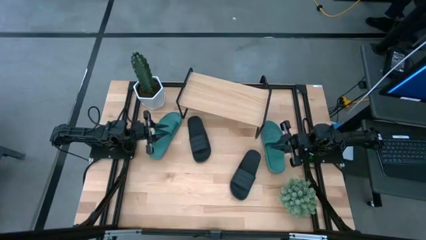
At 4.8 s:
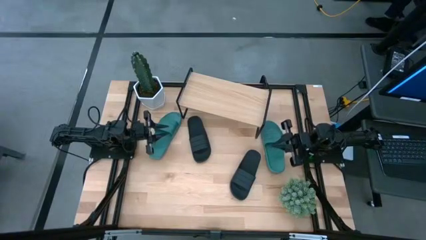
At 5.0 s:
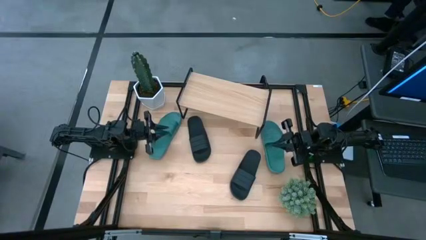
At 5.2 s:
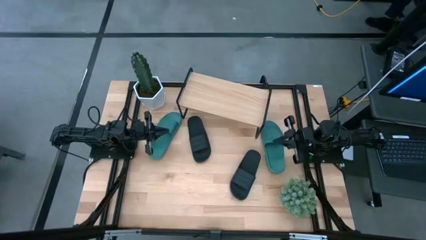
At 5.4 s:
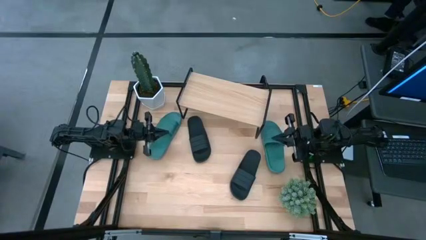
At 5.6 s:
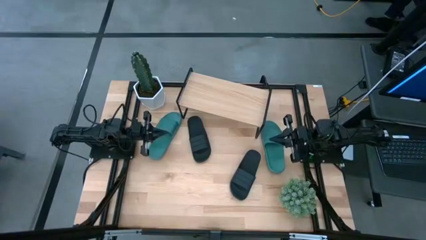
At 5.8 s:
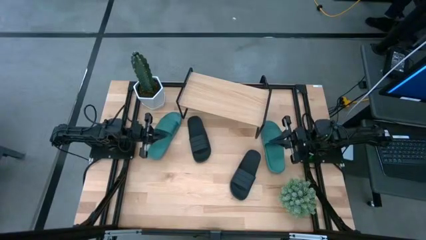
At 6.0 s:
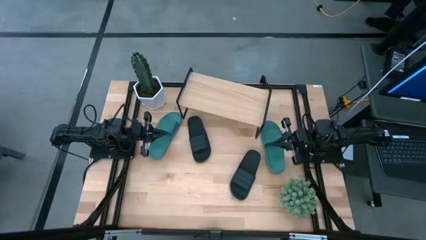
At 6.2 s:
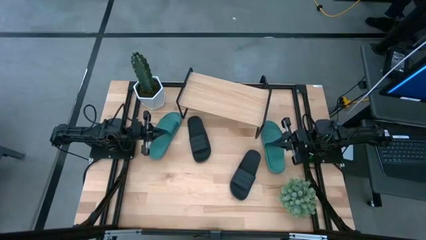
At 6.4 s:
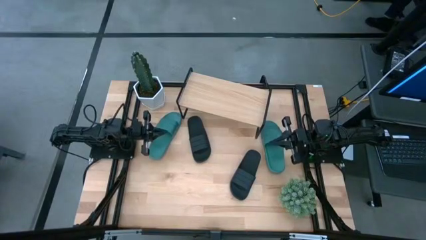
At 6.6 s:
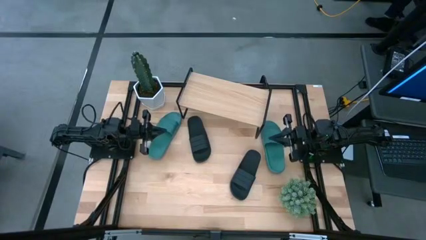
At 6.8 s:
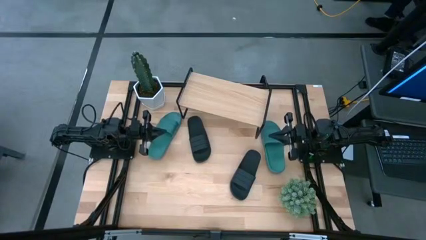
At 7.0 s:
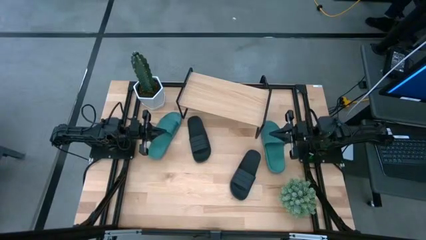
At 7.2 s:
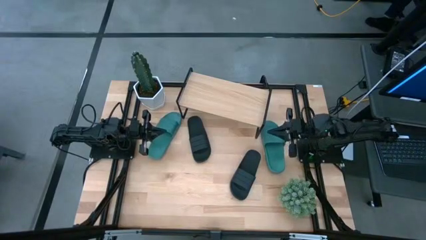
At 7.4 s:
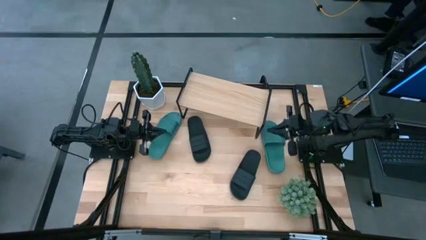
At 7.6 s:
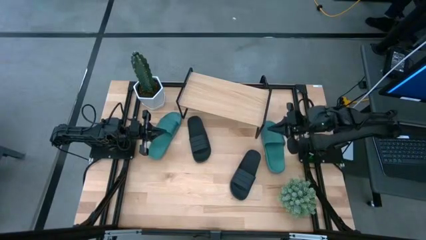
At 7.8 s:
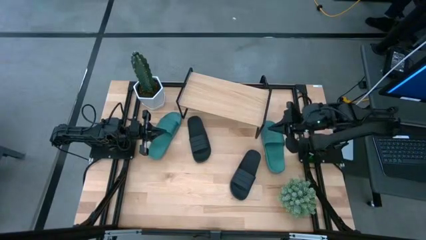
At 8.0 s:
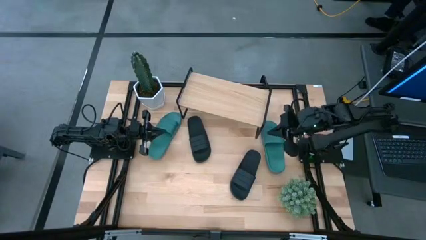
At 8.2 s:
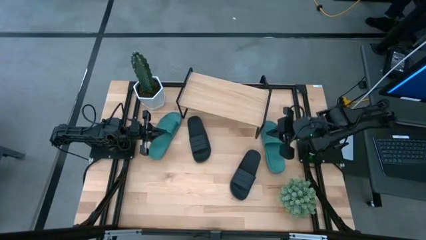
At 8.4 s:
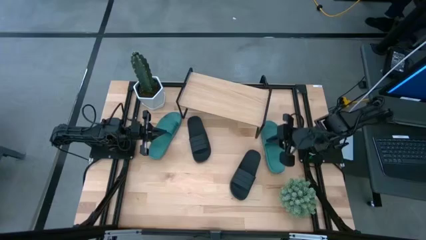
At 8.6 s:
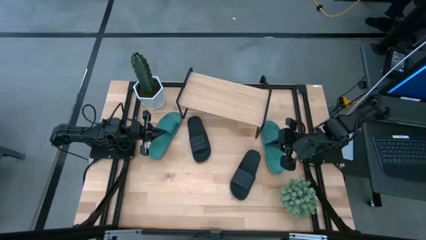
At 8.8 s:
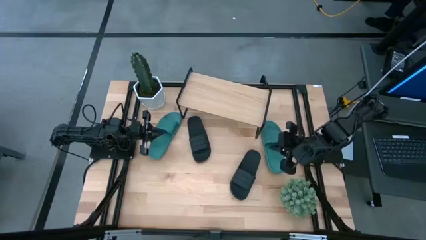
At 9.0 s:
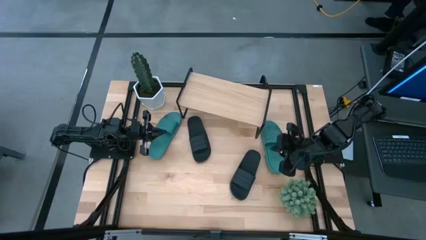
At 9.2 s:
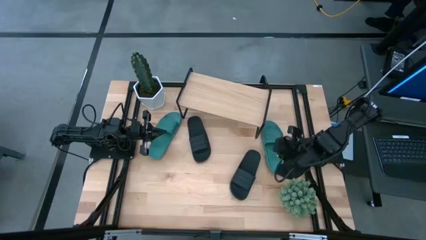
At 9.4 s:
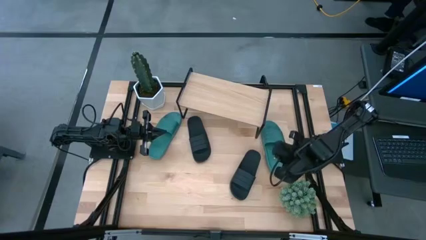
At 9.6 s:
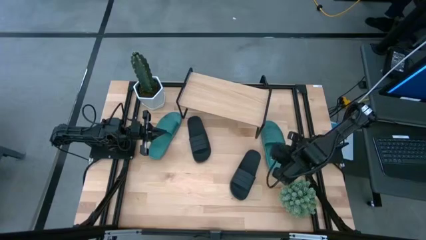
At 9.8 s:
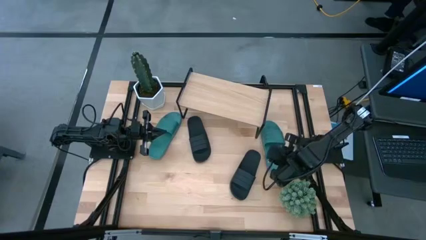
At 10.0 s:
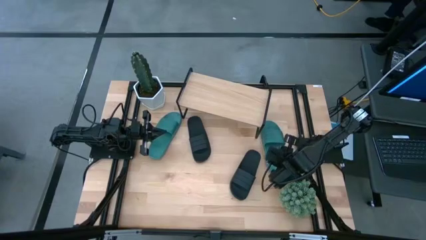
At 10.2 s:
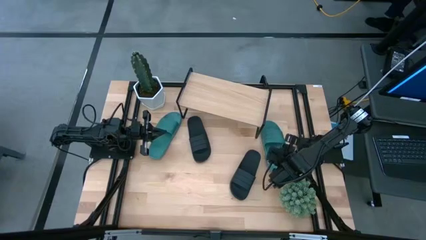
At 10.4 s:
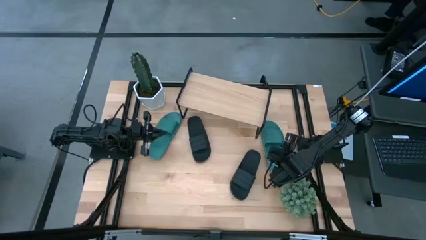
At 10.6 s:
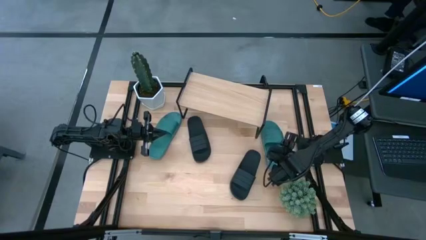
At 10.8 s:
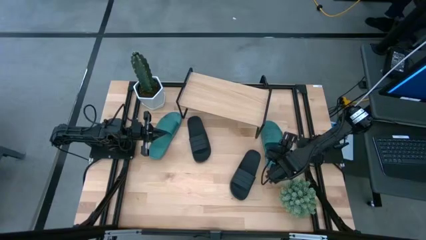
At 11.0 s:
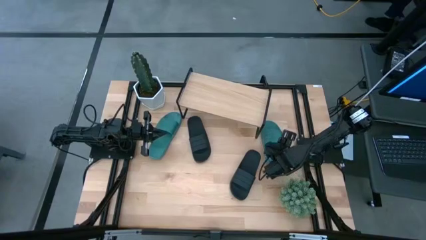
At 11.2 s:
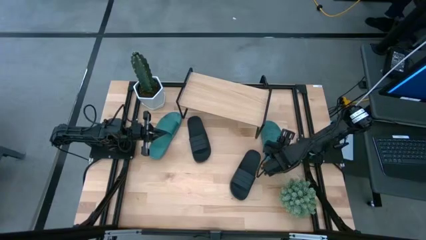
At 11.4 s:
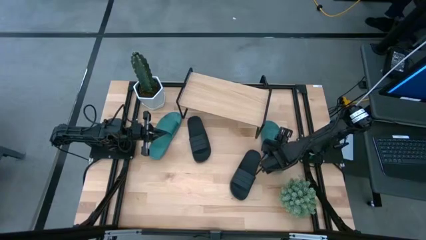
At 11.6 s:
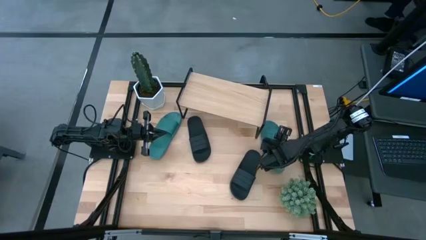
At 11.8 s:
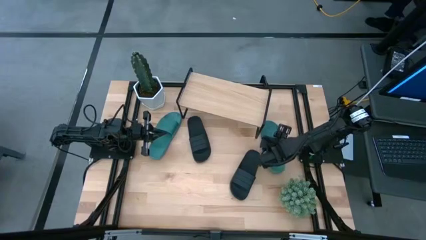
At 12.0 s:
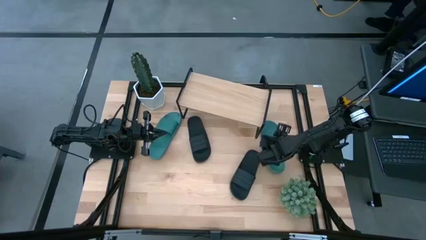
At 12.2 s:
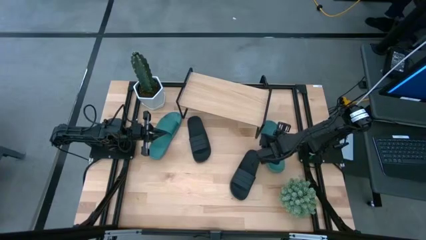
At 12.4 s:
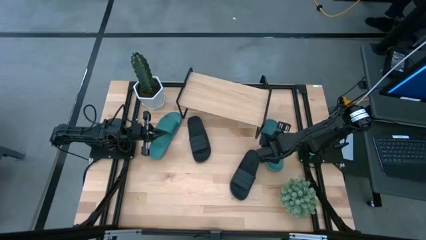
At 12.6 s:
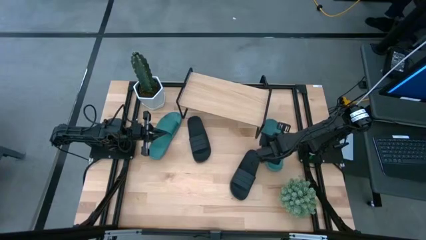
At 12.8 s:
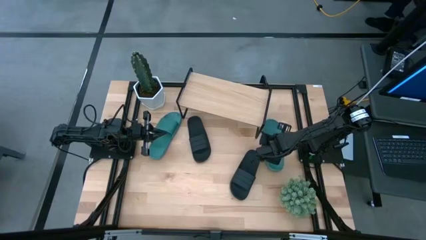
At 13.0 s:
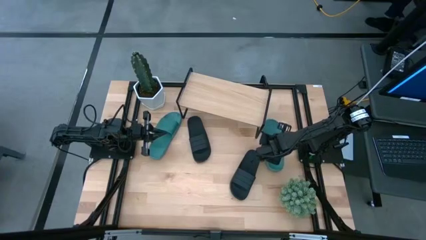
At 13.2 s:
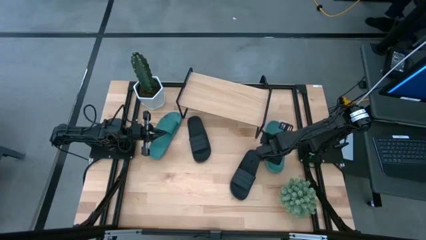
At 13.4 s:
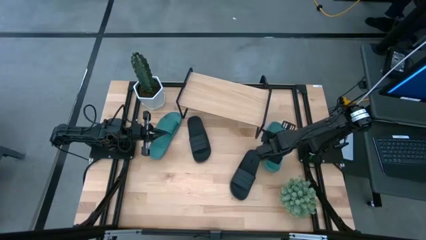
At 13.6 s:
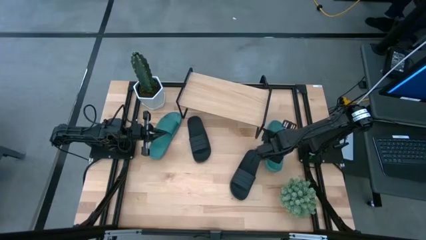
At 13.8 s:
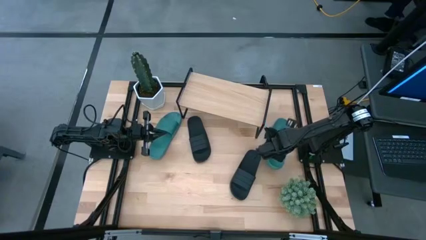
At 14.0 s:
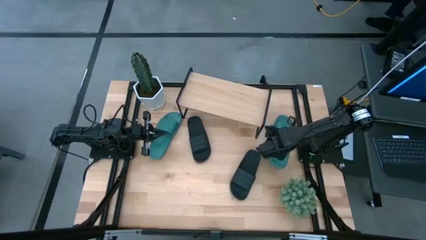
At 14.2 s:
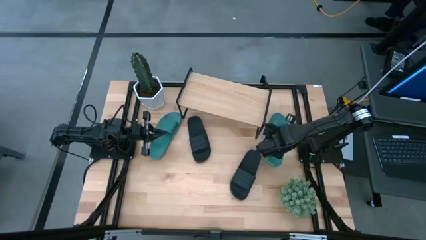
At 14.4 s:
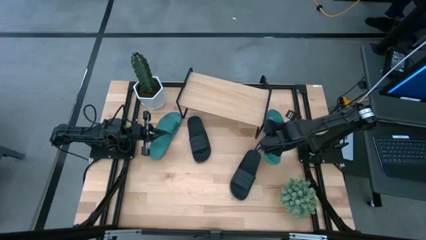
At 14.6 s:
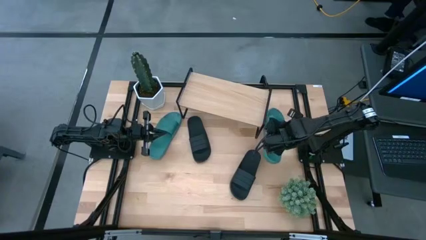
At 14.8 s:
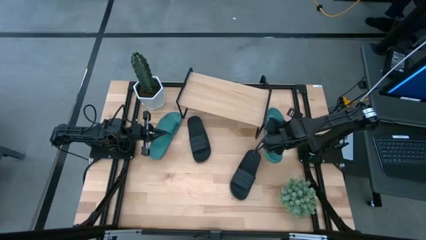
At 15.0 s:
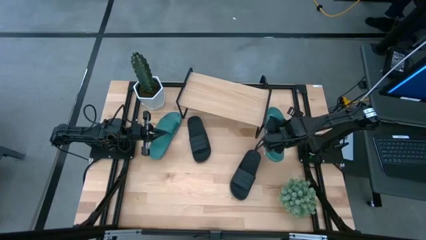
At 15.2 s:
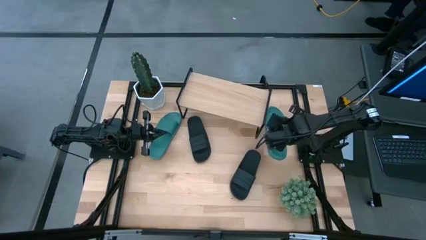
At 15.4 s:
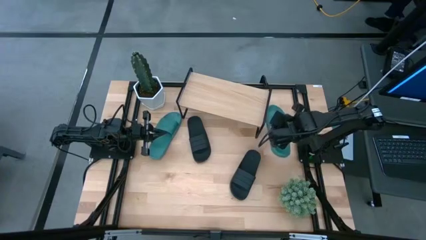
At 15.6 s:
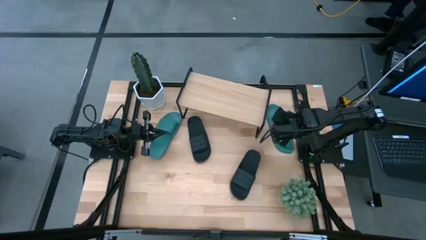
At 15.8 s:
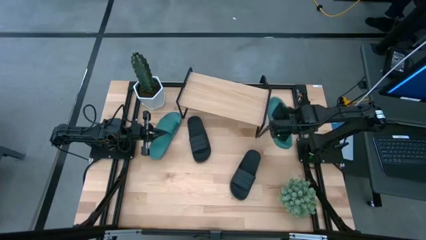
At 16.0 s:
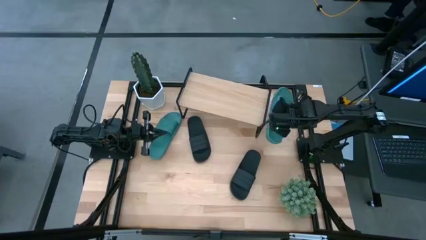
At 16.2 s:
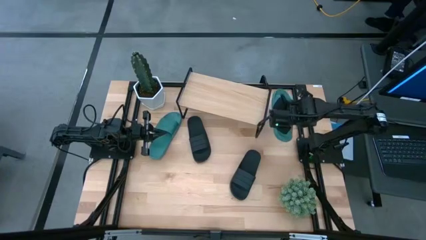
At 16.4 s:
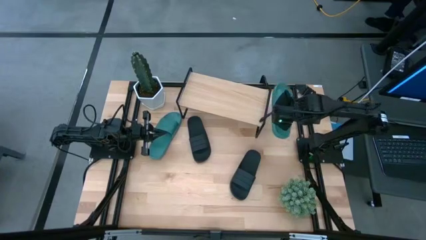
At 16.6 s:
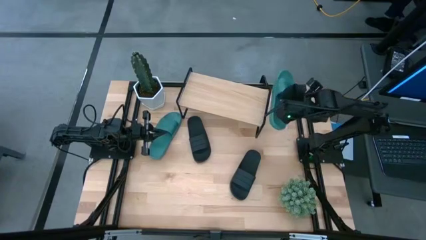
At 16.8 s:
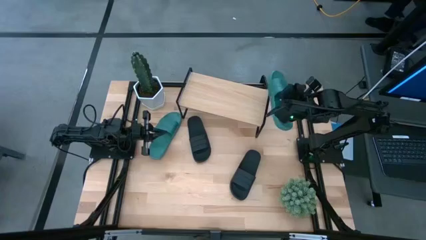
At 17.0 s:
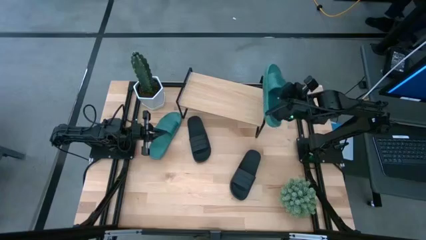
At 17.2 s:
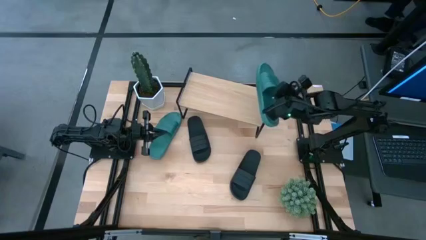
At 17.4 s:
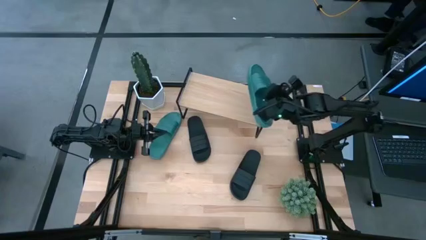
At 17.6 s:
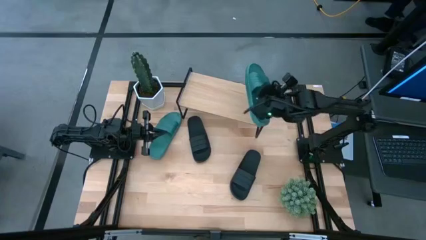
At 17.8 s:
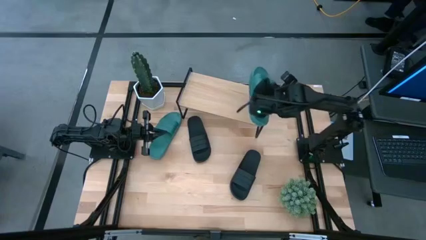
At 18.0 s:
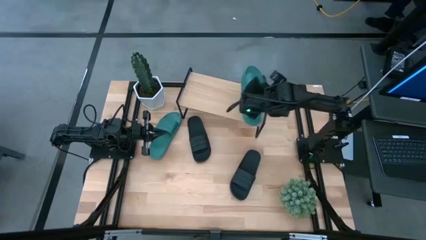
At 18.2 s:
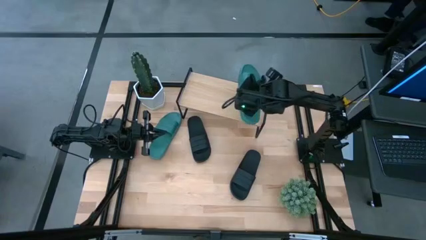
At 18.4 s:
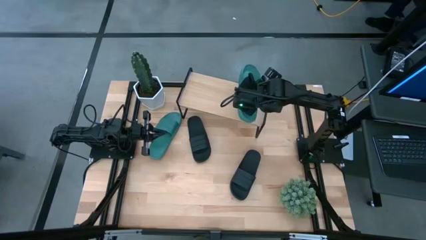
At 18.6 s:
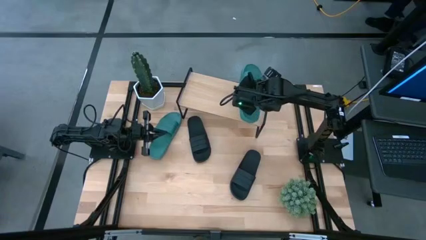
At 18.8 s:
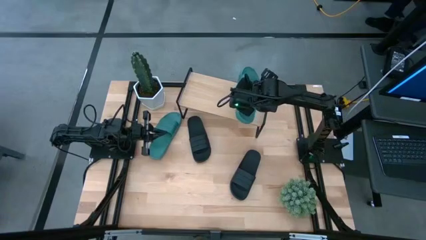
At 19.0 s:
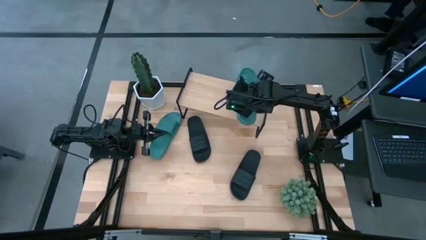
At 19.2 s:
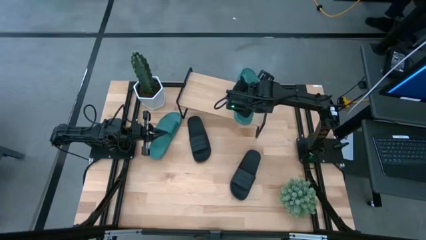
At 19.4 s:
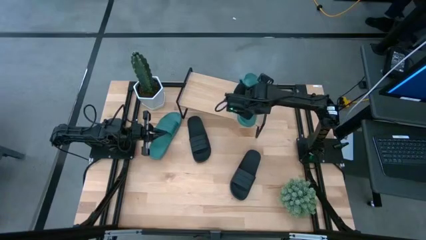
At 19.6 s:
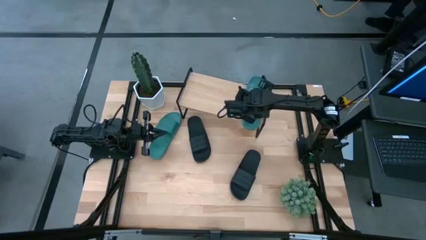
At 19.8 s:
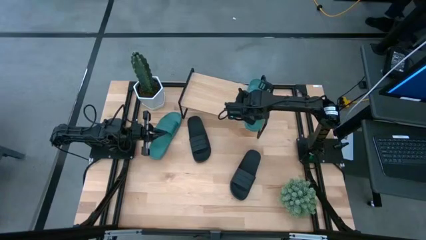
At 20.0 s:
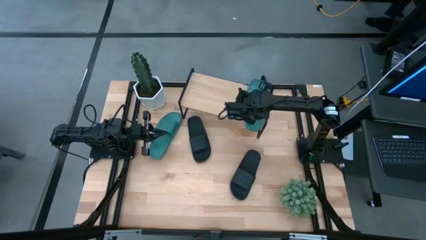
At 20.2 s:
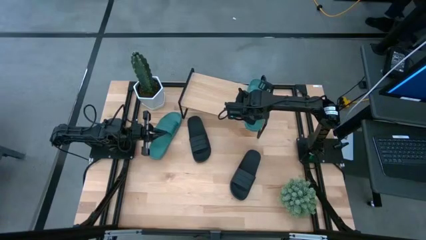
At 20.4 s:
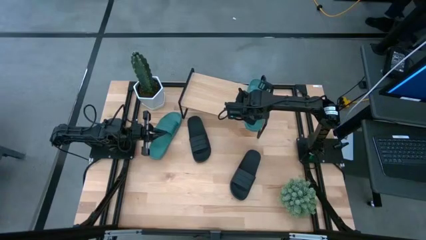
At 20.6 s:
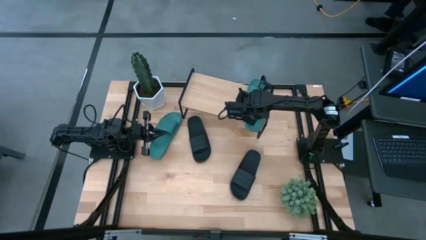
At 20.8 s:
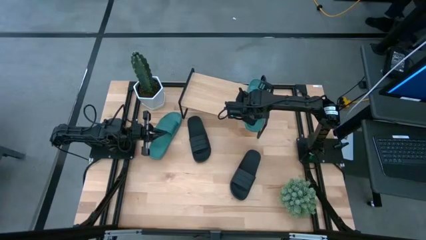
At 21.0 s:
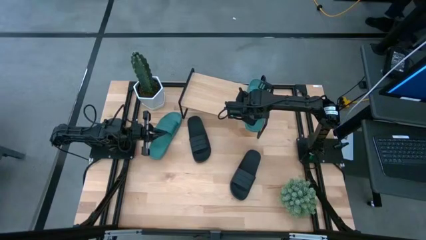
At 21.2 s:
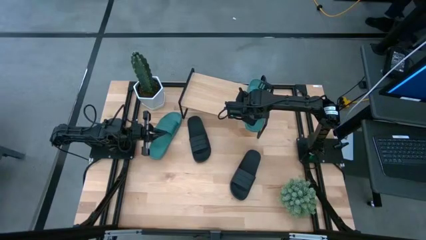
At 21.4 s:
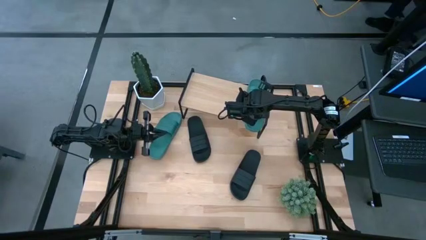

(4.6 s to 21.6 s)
Task: Pick and place slides into the shelf
Put the right green slide on the shelf
